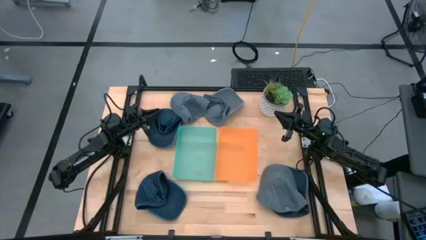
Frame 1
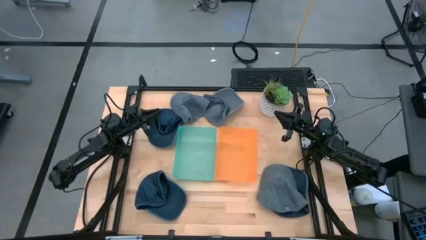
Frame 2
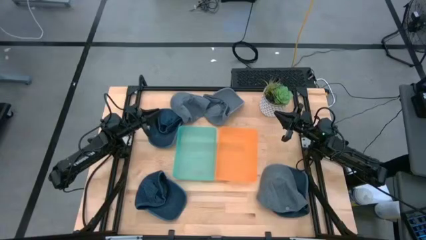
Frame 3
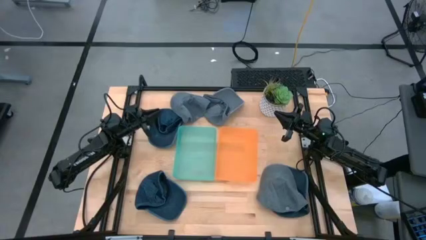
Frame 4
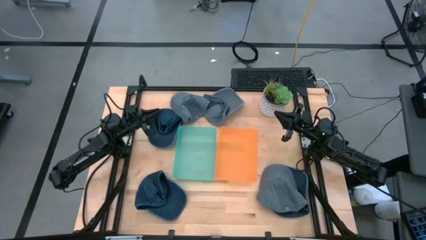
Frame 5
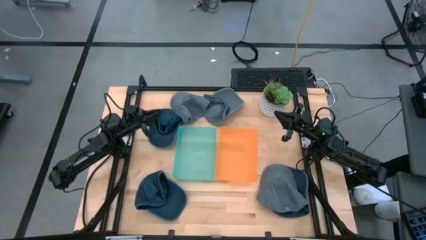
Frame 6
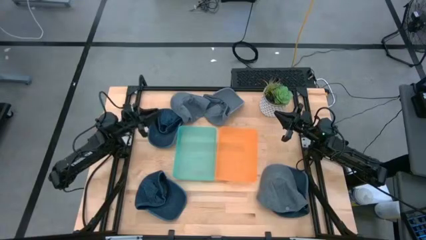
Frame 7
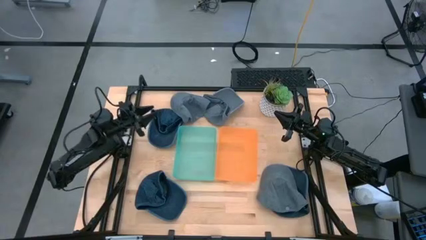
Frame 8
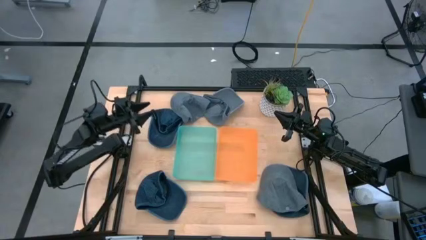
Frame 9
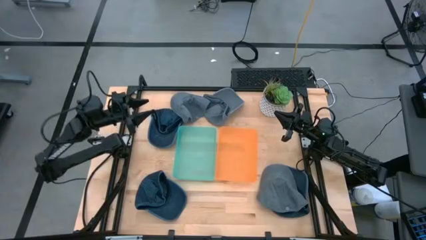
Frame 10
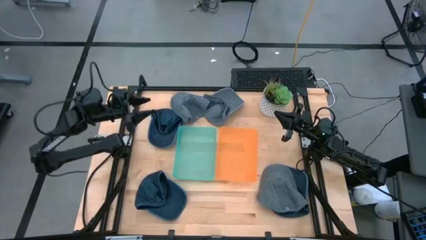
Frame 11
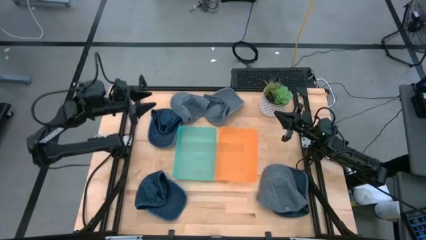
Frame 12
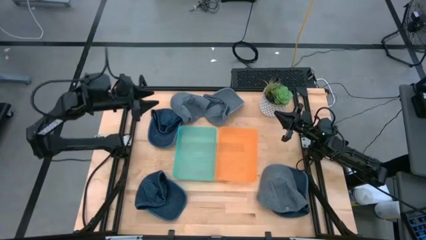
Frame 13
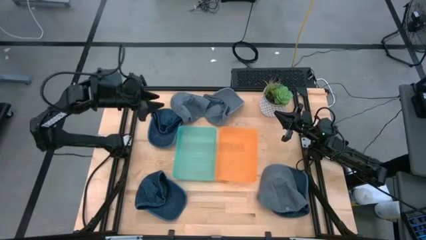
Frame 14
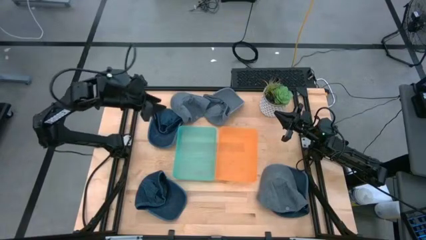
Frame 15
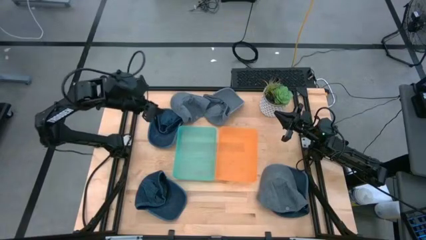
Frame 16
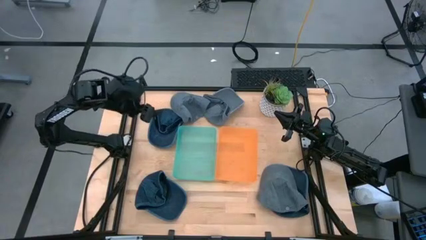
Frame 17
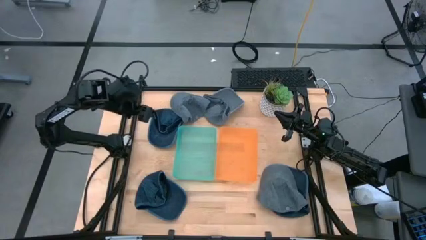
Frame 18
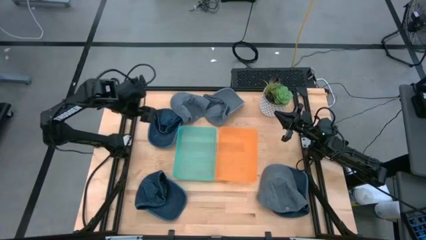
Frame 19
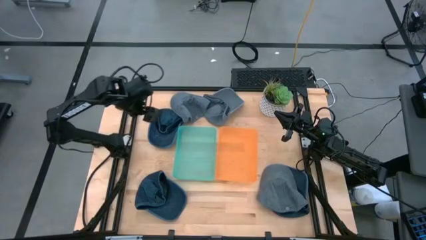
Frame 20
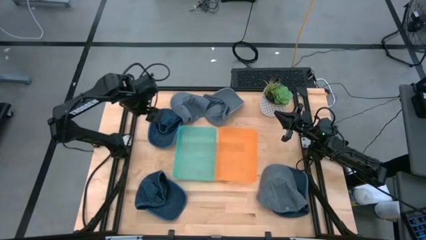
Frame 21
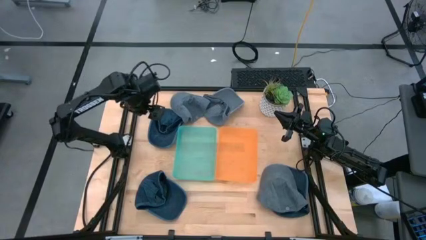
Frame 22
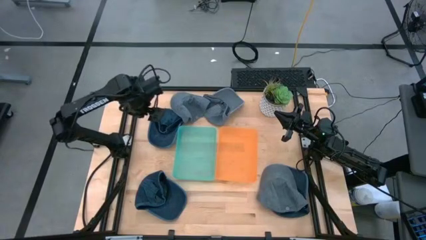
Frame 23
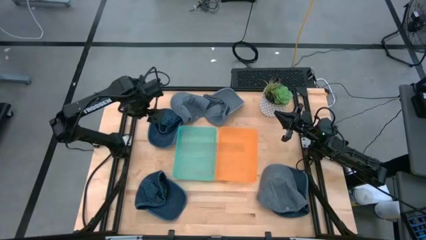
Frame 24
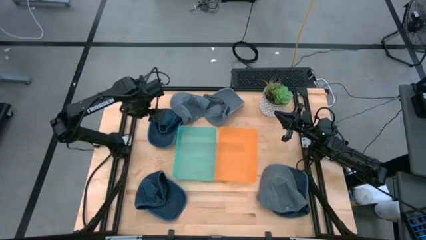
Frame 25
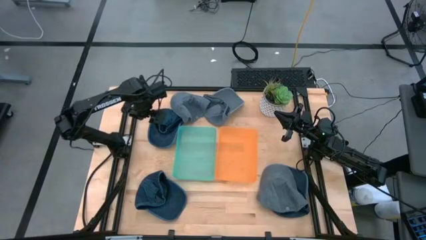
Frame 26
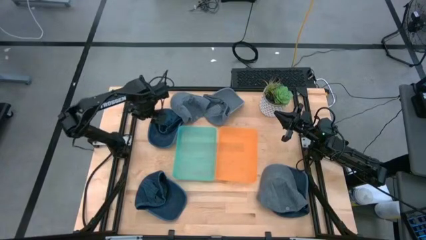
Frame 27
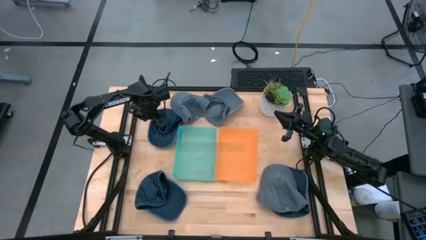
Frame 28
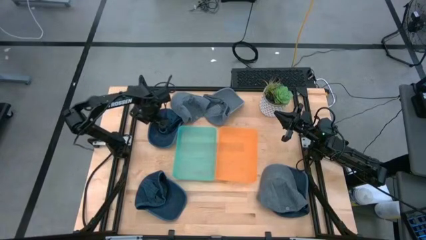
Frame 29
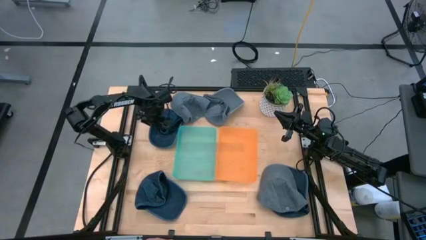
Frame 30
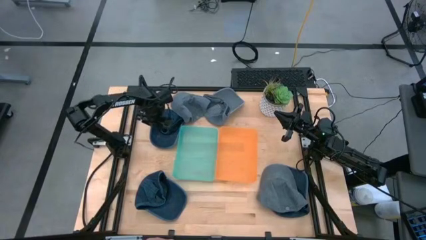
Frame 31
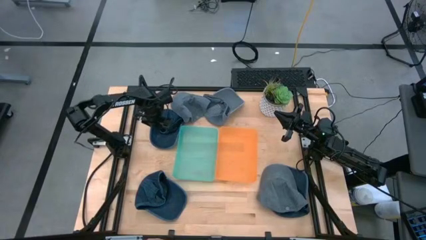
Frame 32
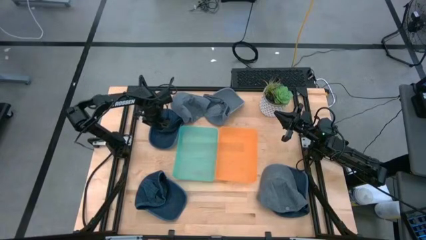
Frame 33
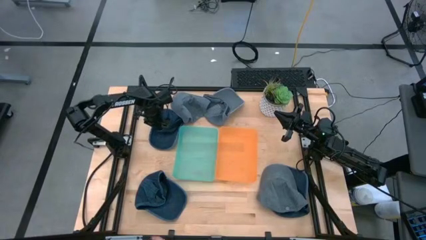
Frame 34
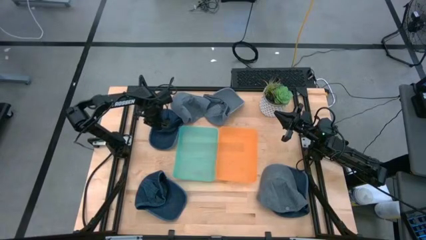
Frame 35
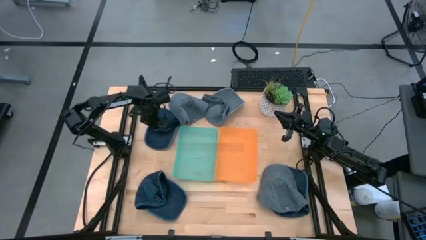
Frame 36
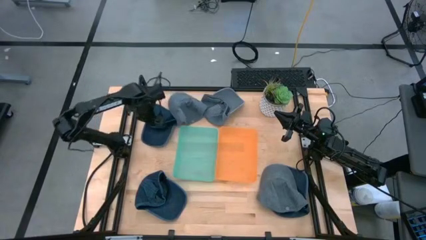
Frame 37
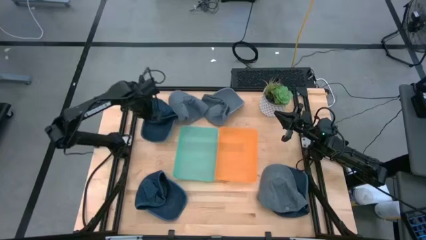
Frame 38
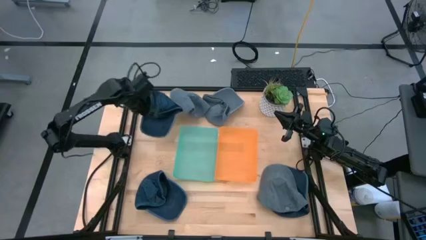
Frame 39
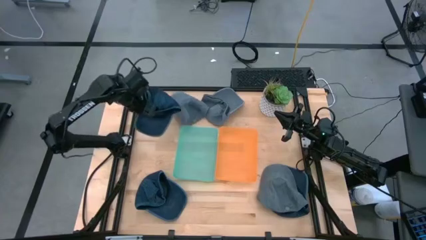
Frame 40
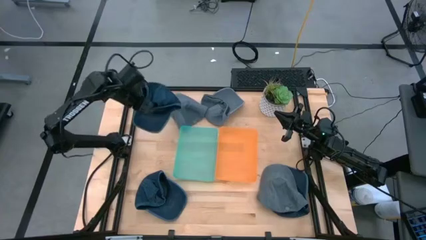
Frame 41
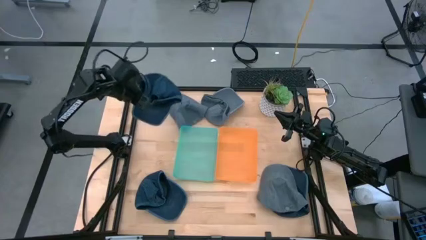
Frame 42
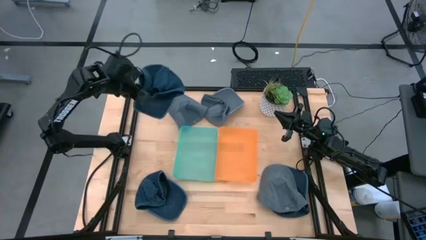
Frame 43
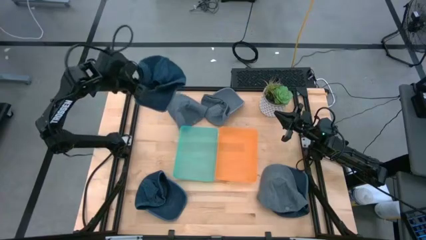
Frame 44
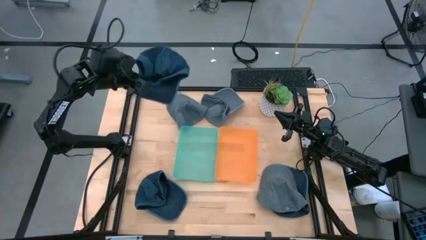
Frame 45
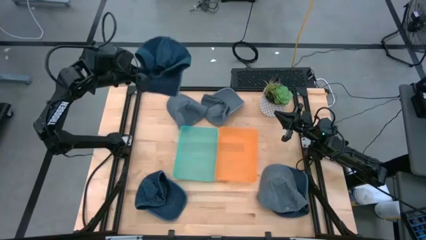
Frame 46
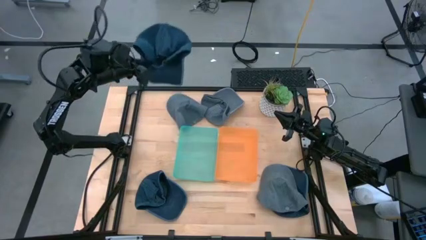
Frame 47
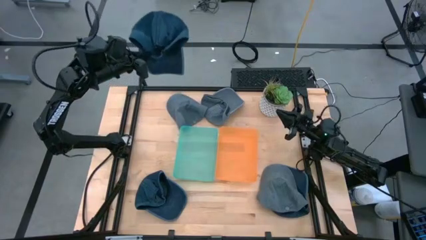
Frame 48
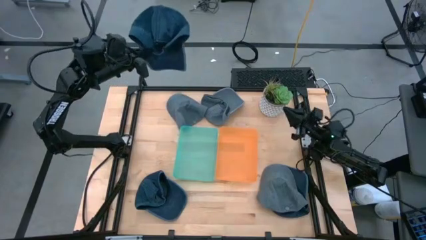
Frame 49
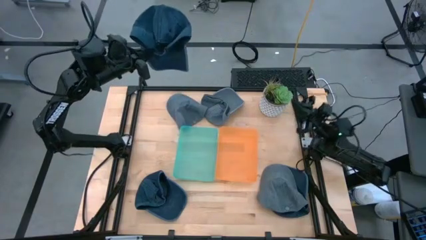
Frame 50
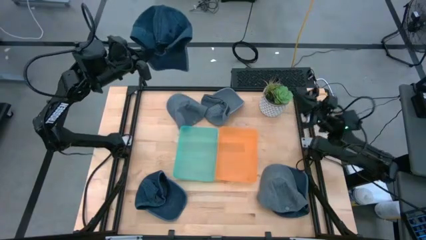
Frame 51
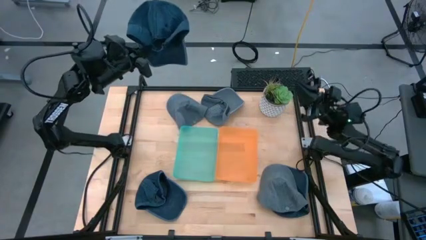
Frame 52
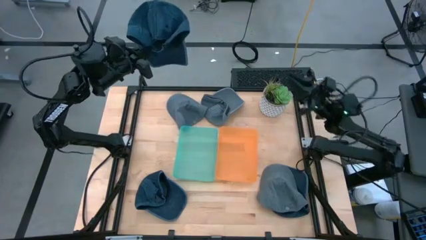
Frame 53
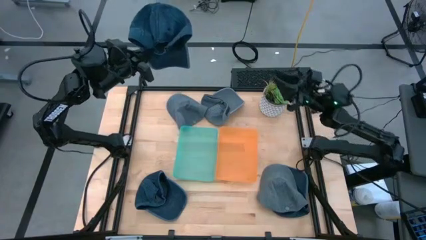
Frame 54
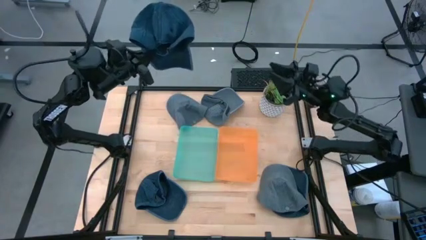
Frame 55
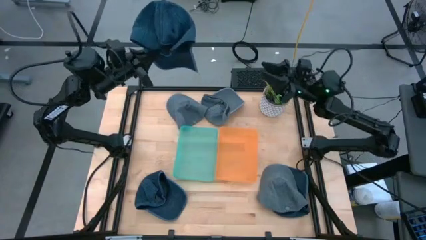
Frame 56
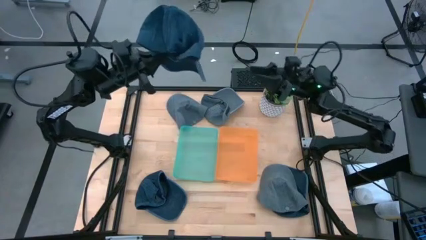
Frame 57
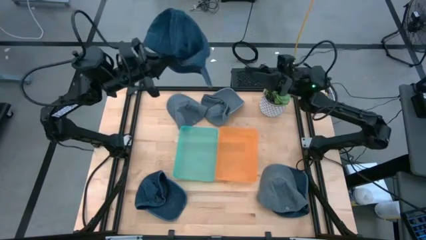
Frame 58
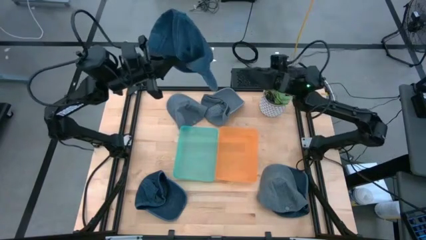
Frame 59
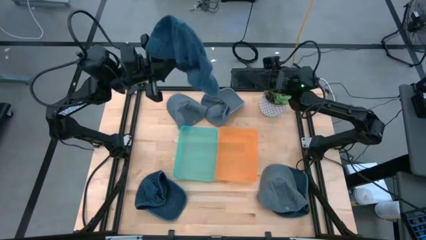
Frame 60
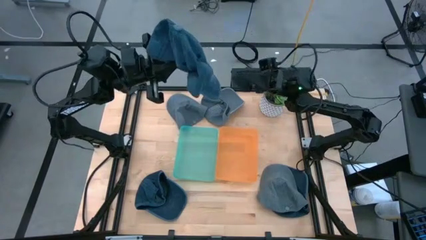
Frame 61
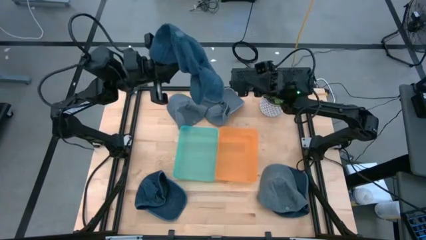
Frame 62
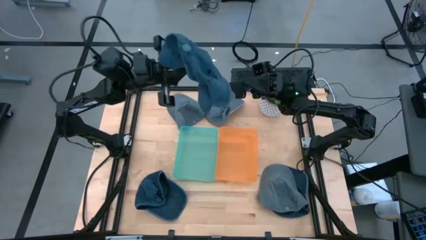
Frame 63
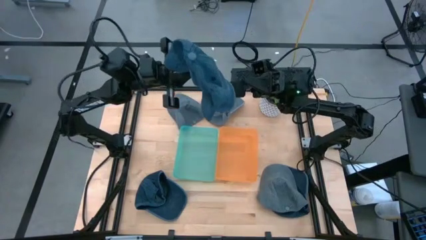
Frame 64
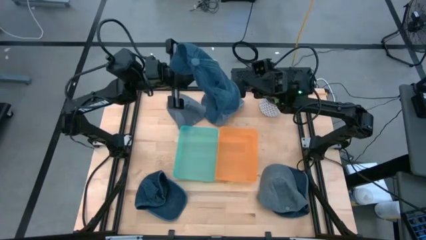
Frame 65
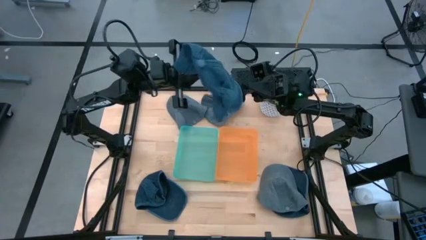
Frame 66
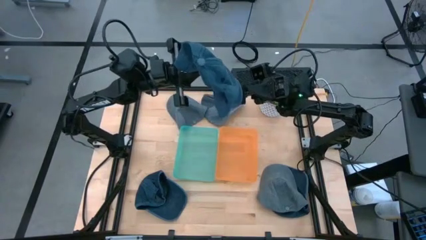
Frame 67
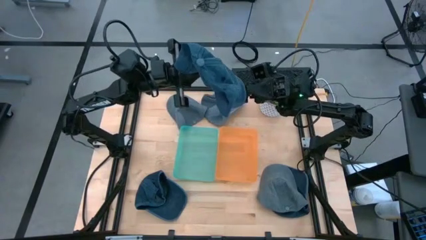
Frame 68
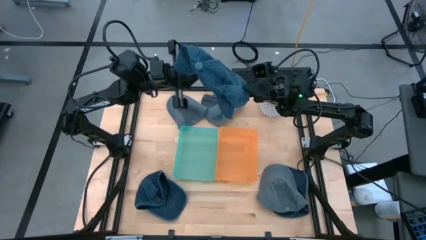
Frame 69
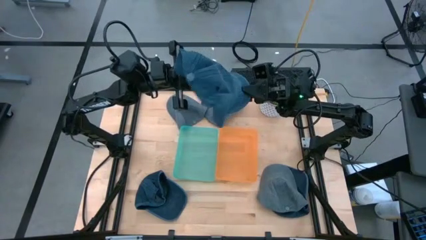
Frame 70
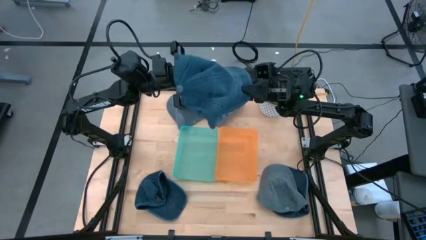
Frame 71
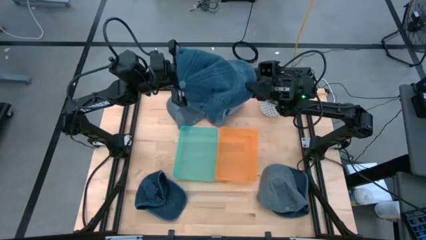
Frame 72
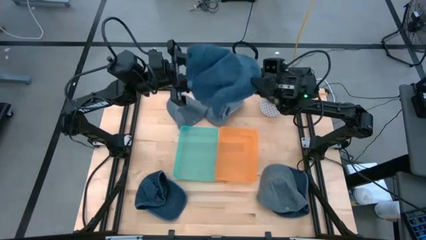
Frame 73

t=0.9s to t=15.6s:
Task: Pick & Place hat
Put the top blue cap into the orange bin
